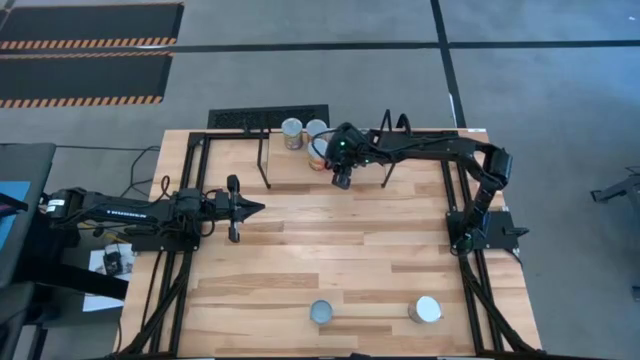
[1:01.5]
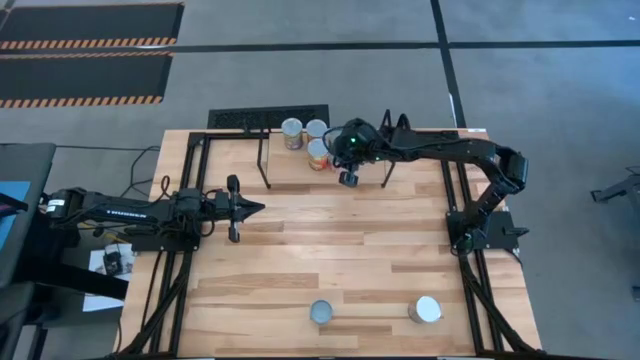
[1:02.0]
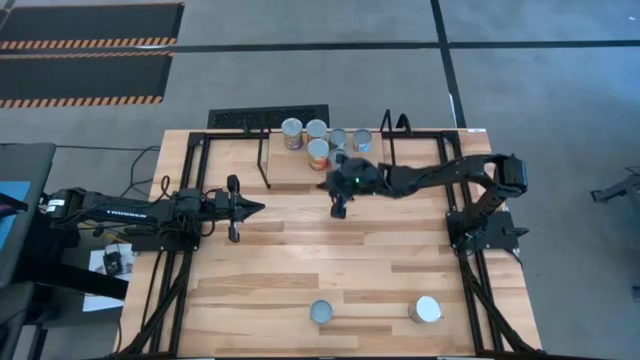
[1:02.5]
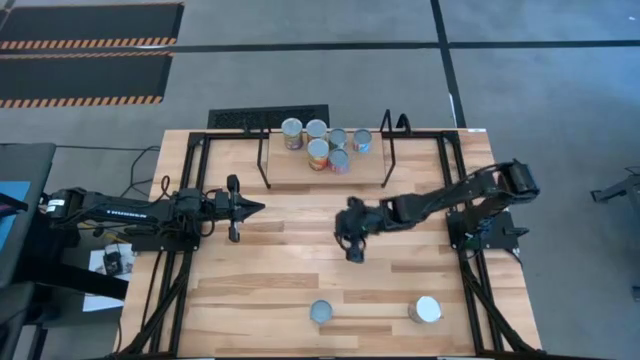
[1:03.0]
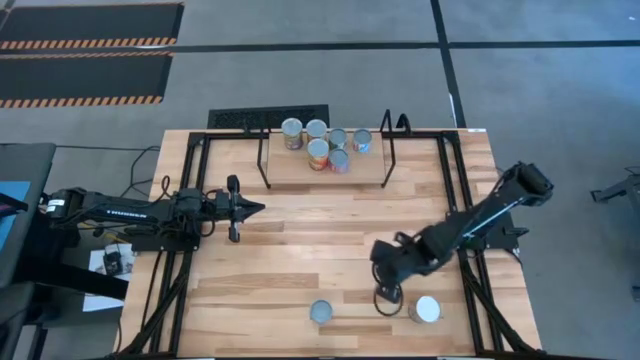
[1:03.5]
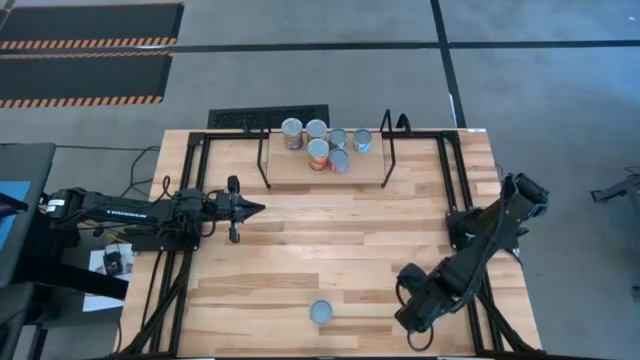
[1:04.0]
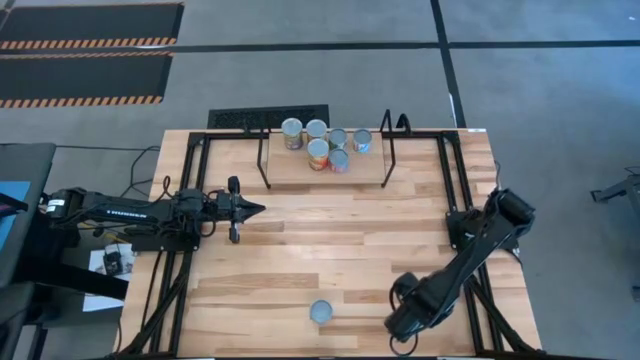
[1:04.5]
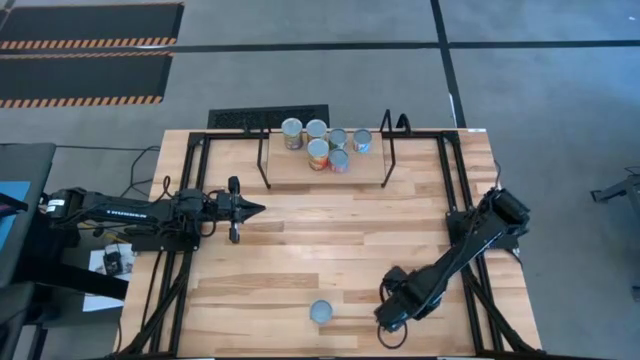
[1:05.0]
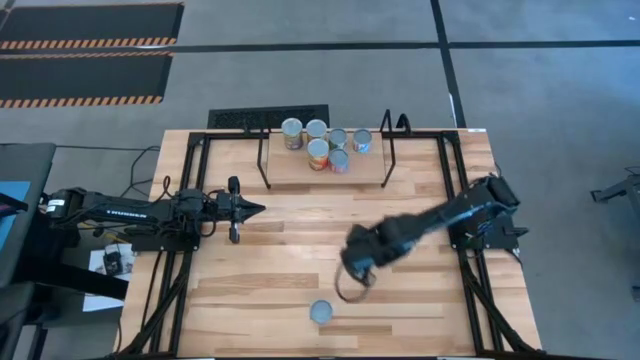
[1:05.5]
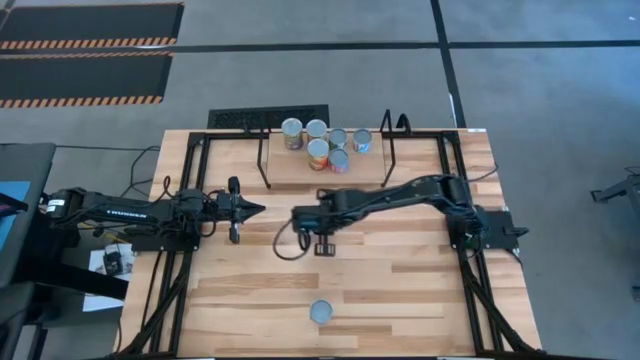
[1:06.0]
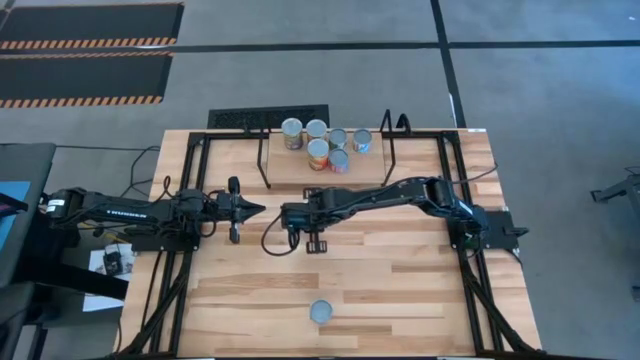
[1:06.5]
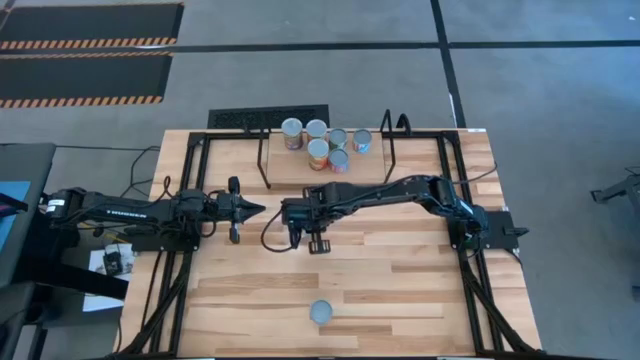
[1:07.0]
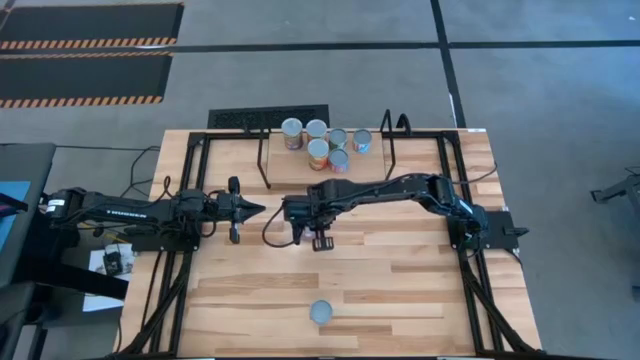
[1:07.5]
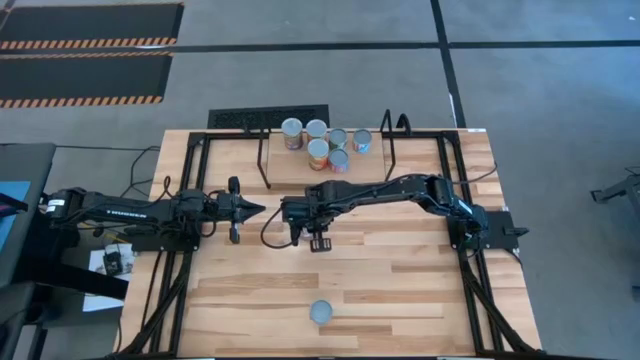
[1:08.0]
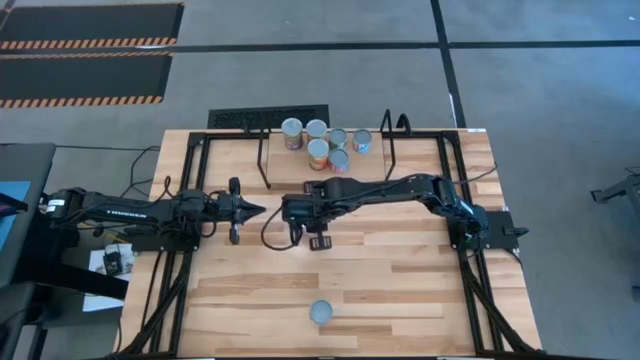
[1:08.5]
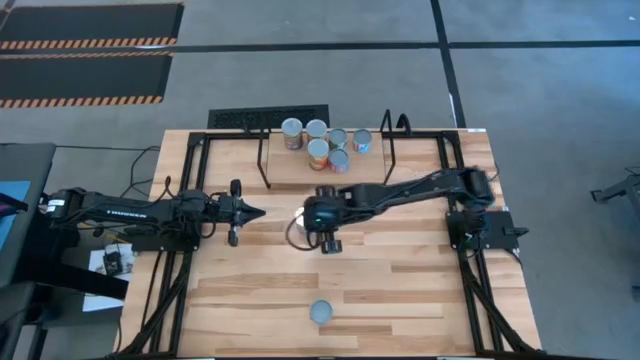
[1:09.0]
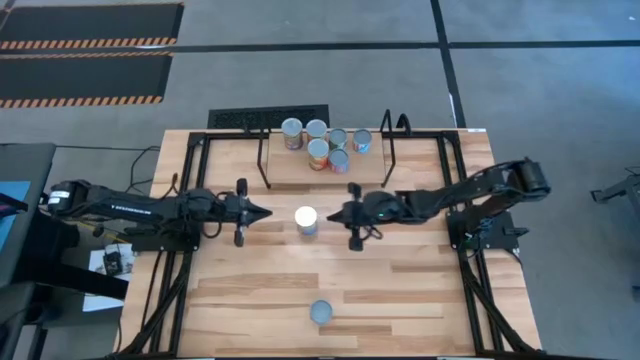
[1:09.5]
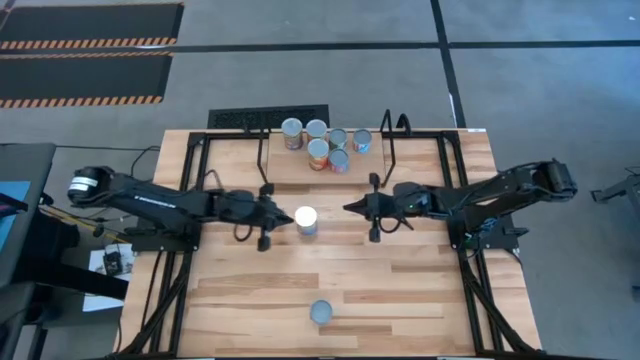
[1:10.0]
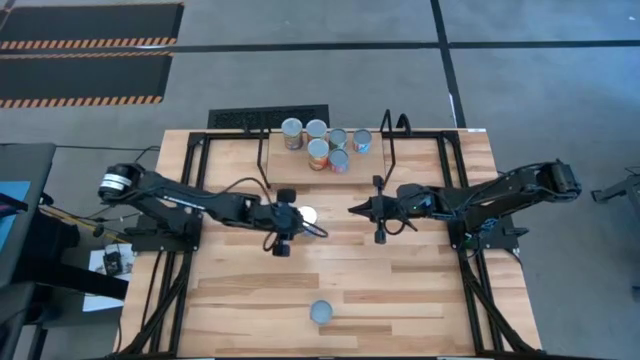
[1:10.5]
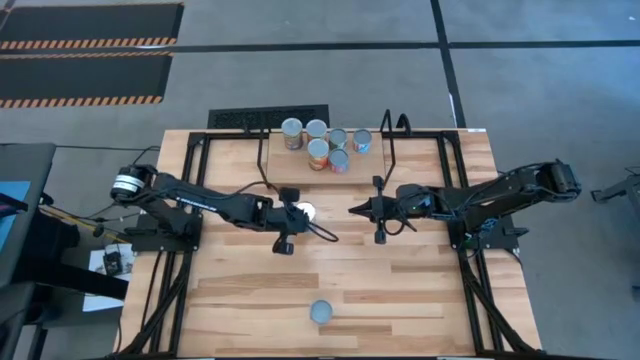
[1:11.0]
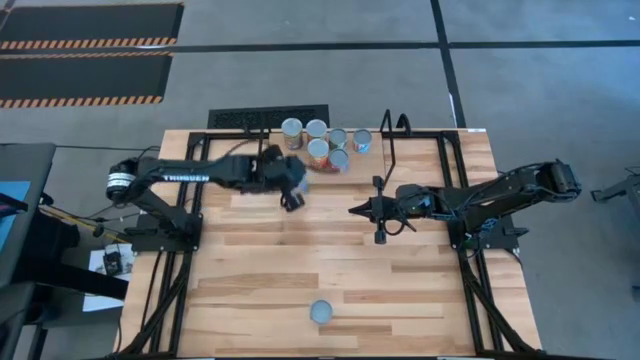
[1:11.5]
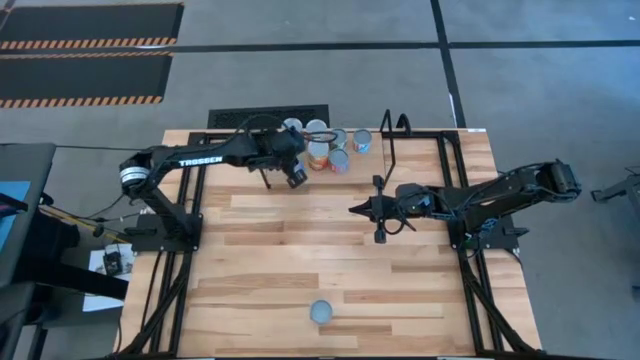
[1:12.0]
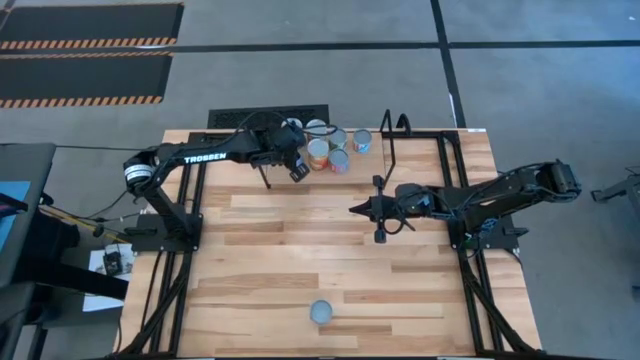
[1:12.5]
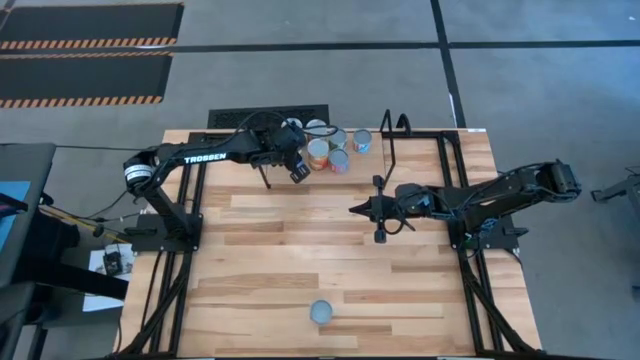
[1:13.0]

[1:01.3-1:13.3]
Task: Pick and place cans onto a shelf
Put the canned peaches on the shelf aligned with the other canned peaches

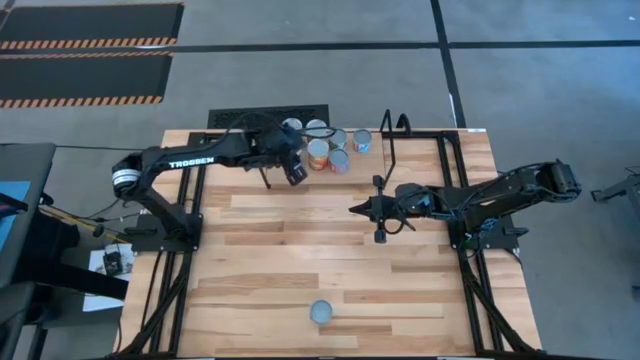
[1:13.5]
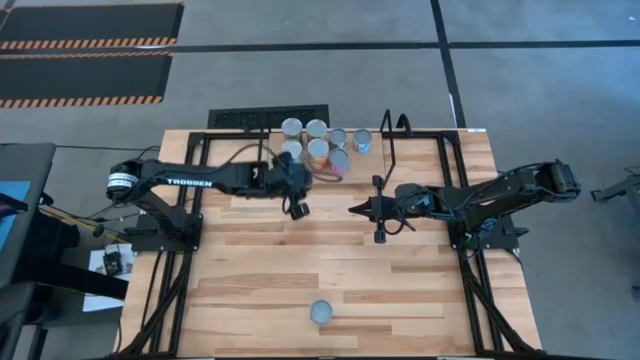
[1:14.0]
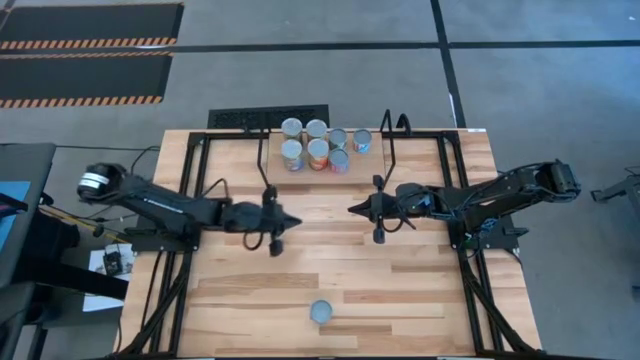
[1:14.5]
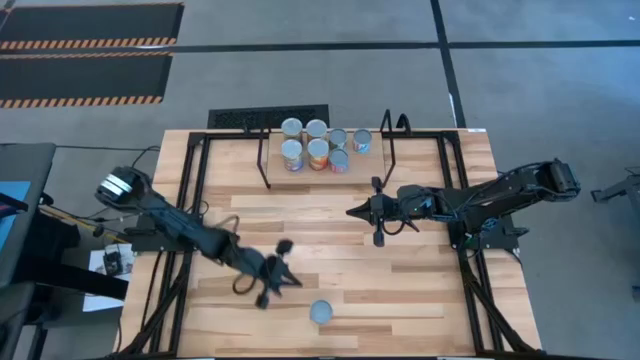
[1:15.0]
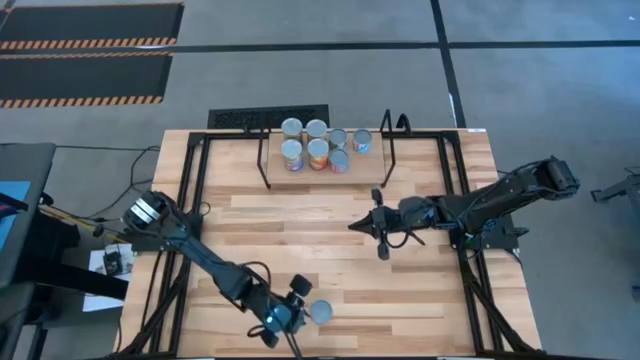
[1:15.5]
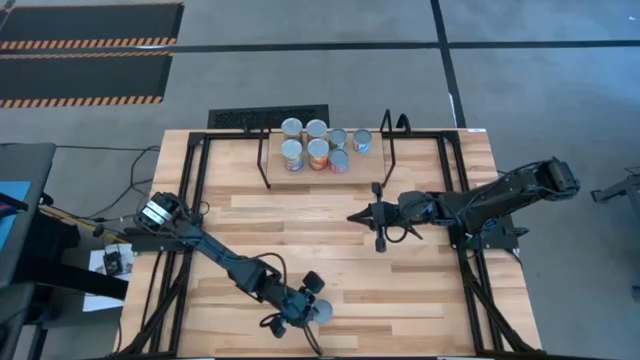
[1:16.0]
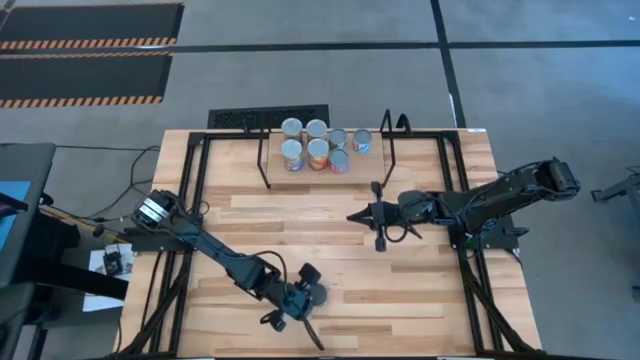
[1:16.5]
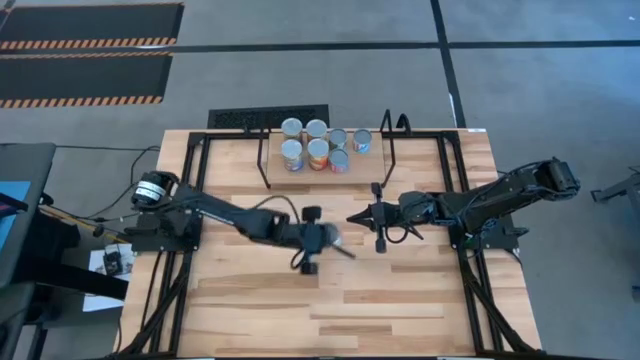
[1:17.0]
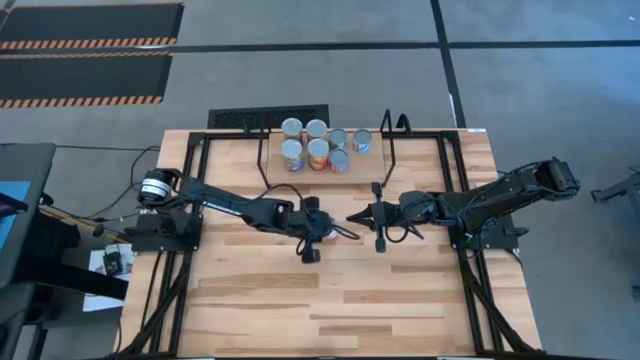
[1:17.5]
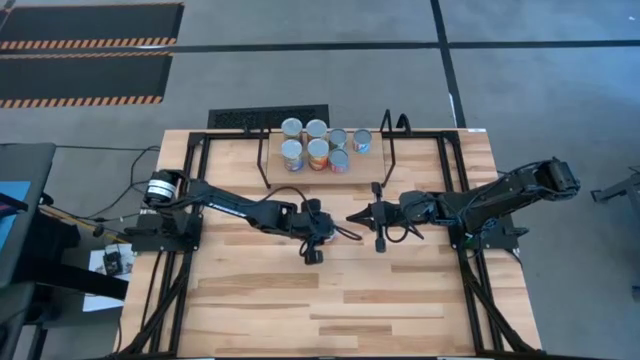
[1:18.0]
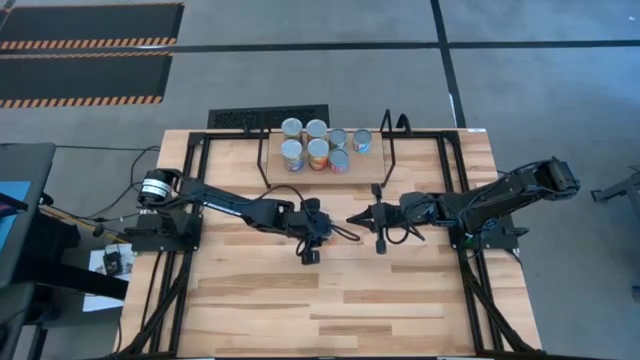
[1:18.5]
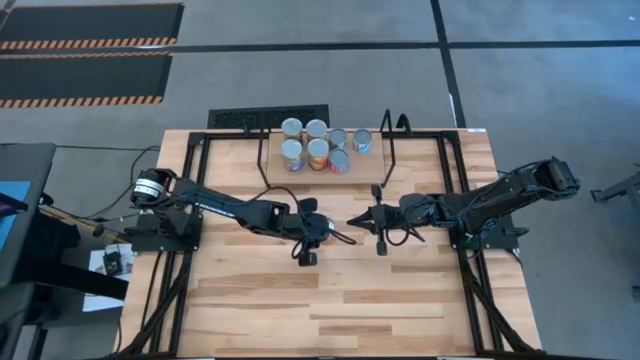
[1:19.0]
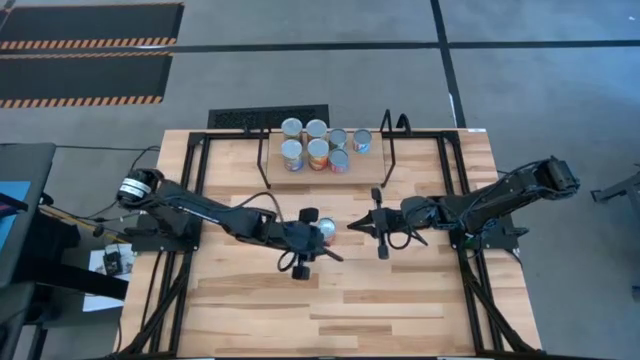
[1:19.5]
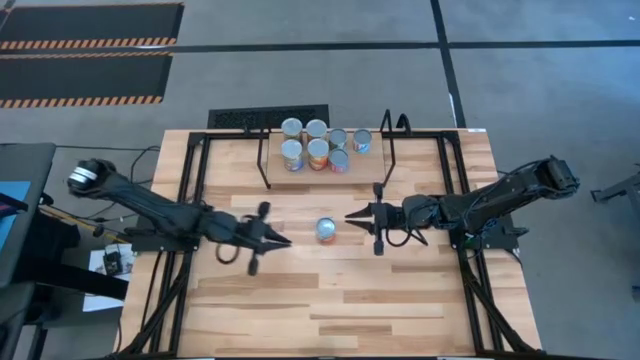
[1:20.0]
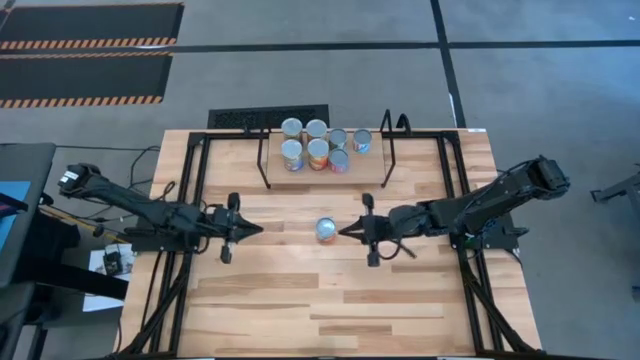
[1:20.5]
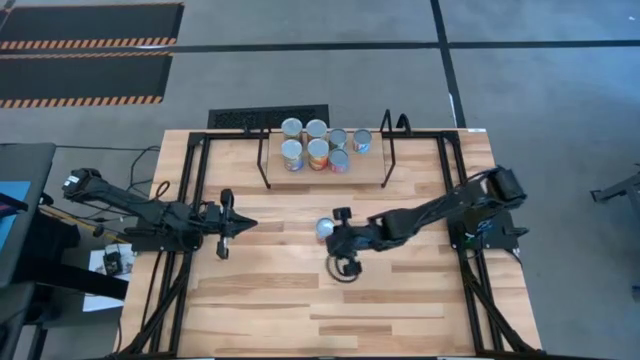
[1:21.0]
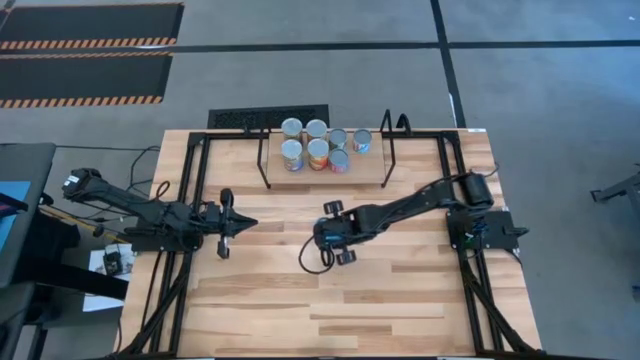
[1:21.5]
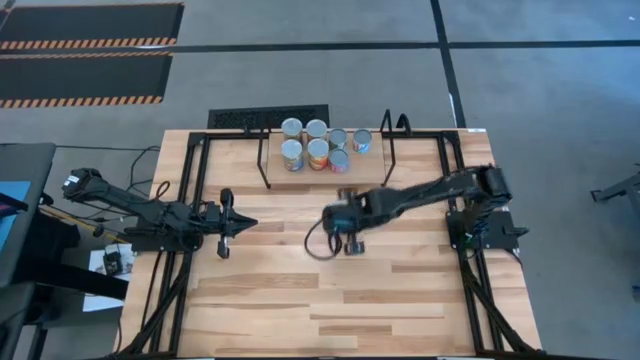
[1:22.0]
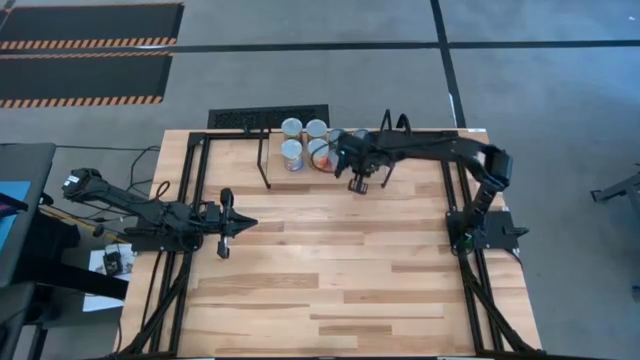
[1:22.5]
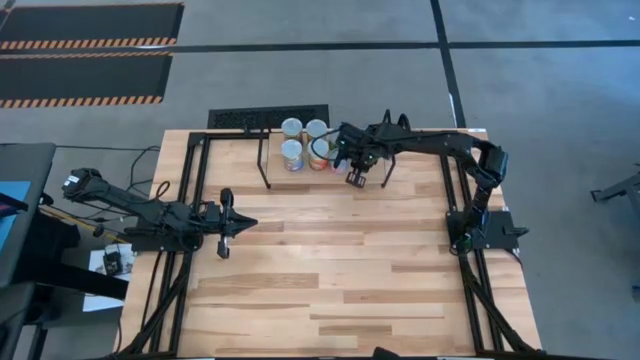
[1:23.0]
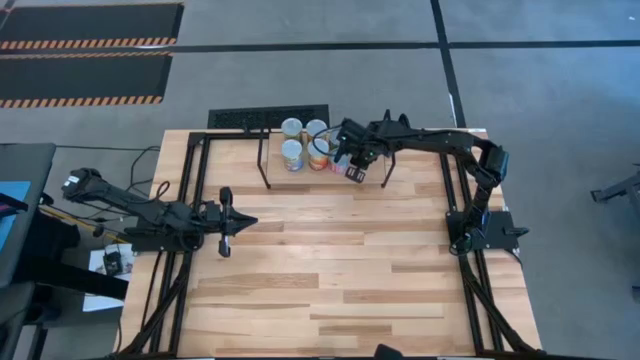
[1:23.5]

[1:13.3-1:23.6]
Put the canned oranges on the shelf
